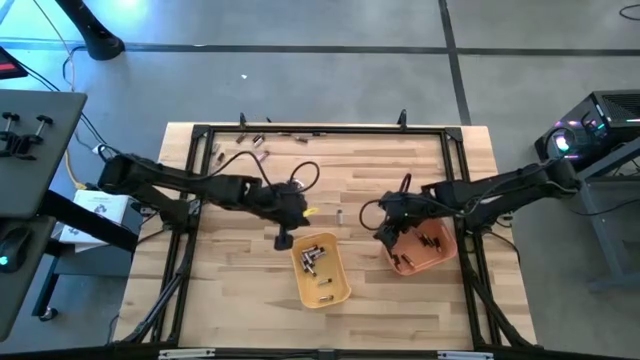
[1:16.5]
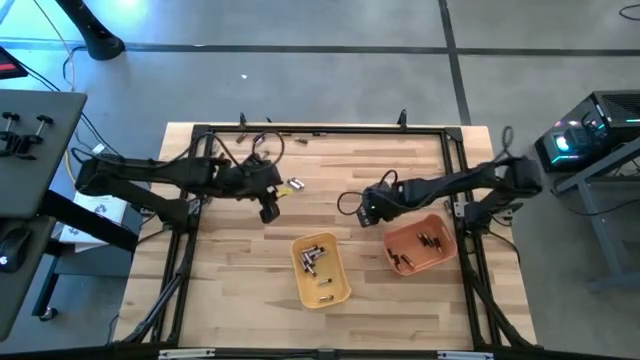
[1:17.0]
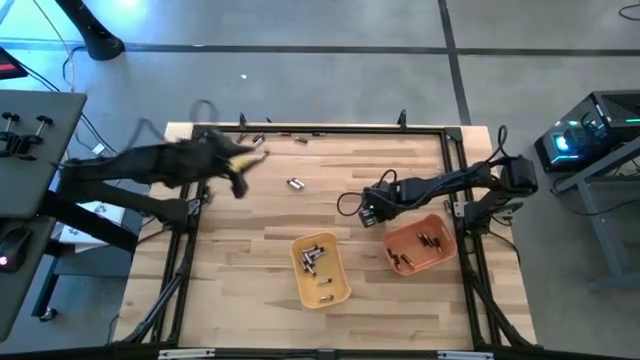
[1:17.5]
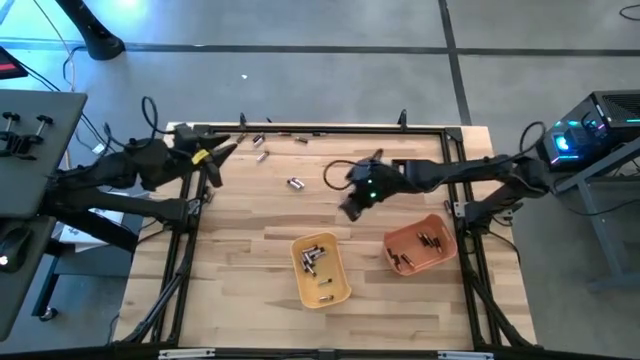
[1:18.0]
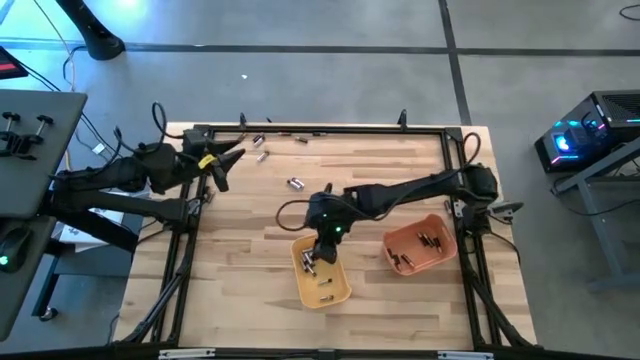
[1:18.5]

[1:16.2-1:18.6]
Task: Sort batteries
Put the silver battery into the yellow bin

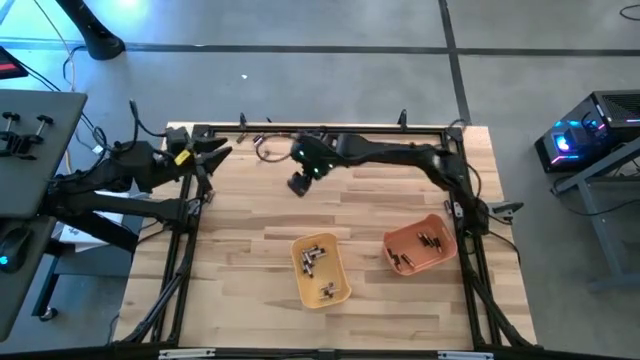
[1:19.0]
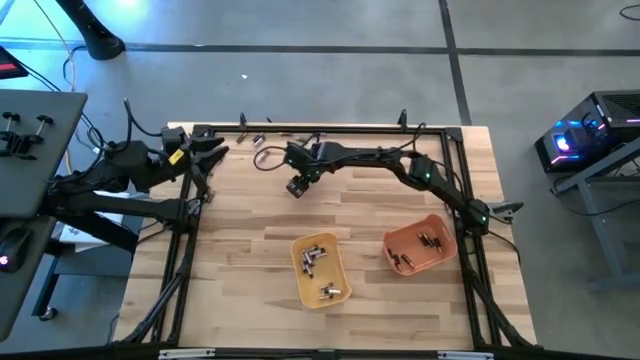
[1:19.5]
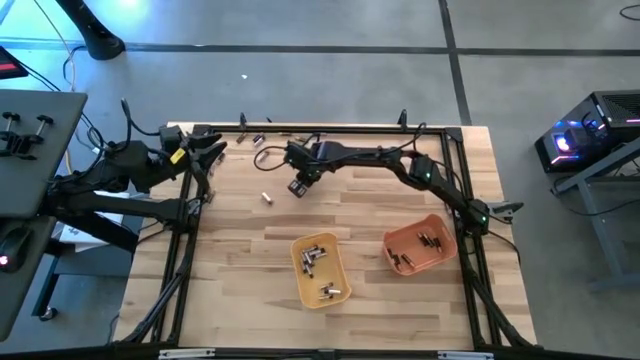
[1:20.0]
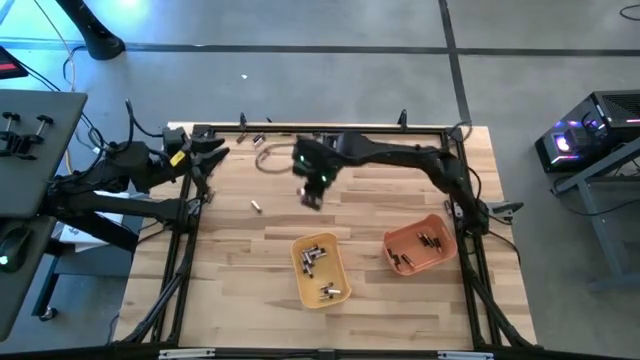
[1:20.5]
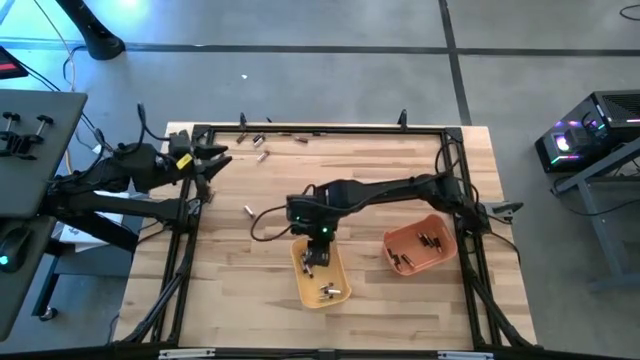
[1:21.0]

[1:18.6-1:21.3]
Put the silver battery into the yellow bin

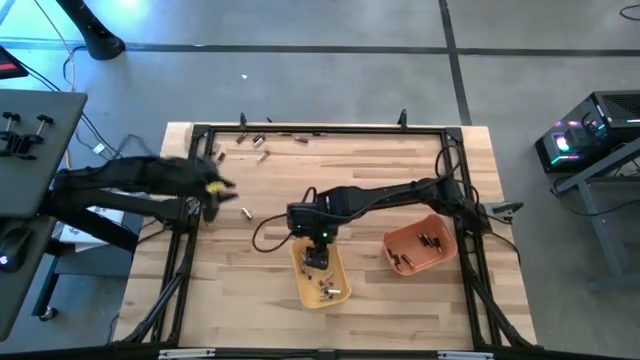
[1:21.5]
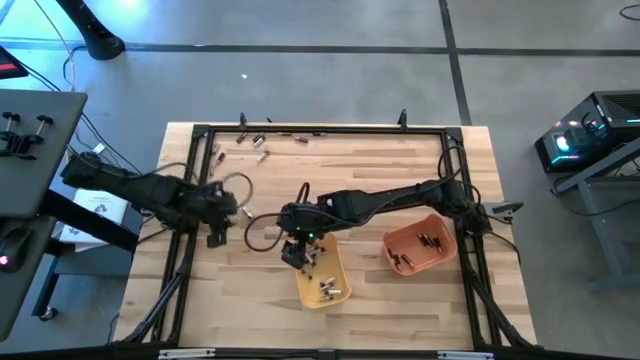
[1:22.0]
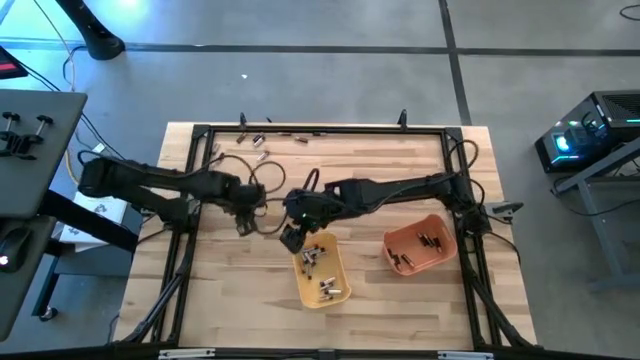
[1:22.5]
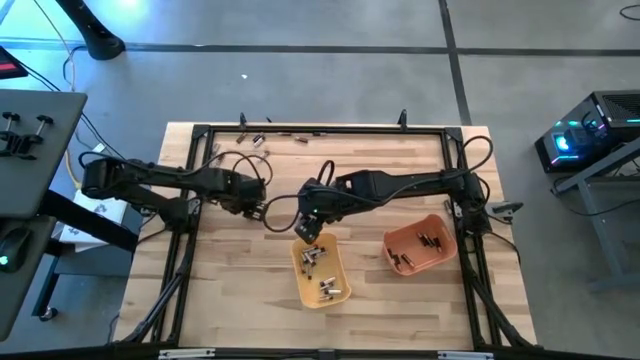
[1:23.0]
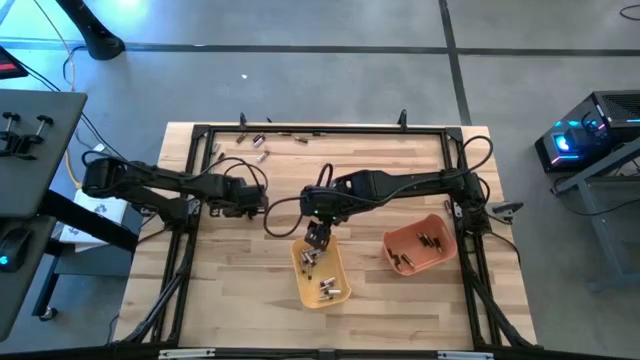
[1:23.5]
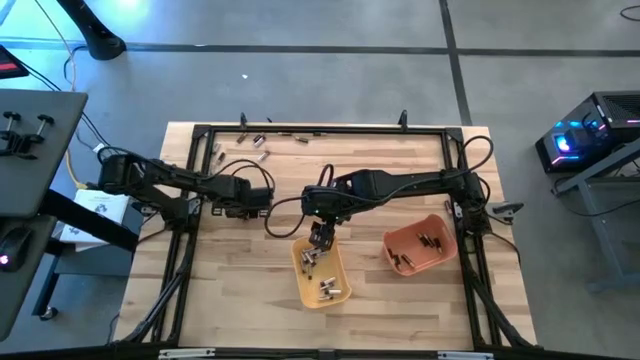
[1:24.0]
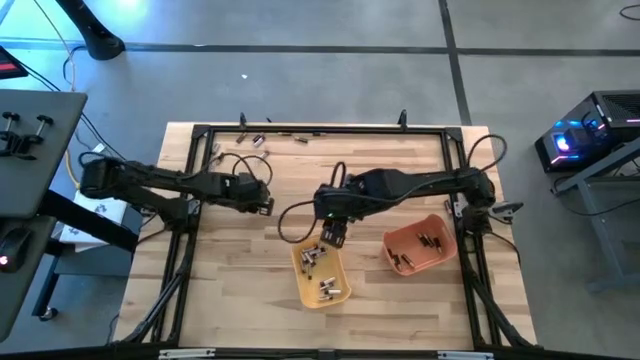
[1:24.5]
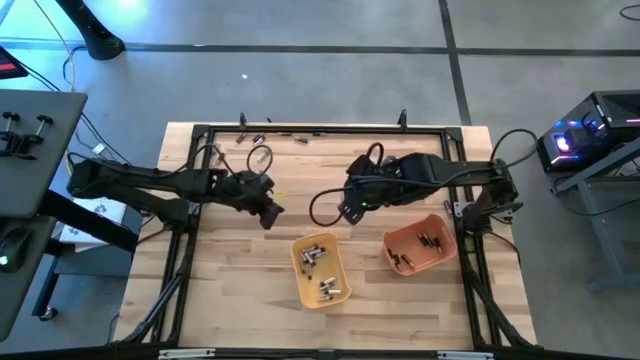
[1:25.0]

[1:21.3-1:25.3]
Put the silver battery into the yellow bin

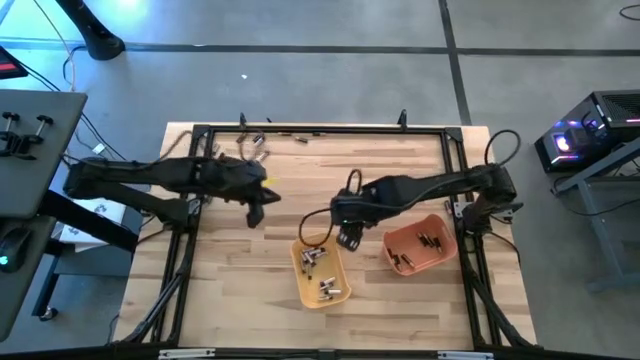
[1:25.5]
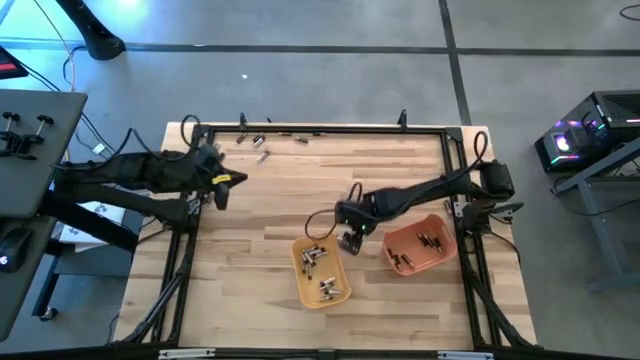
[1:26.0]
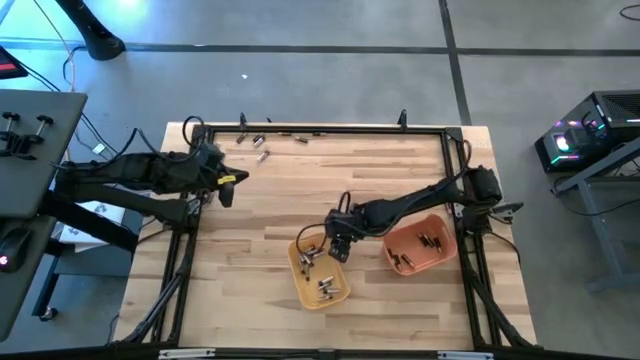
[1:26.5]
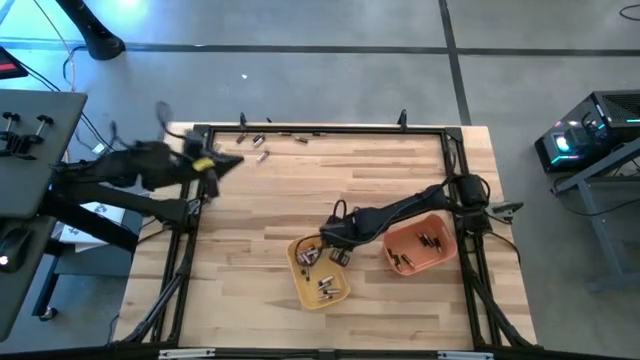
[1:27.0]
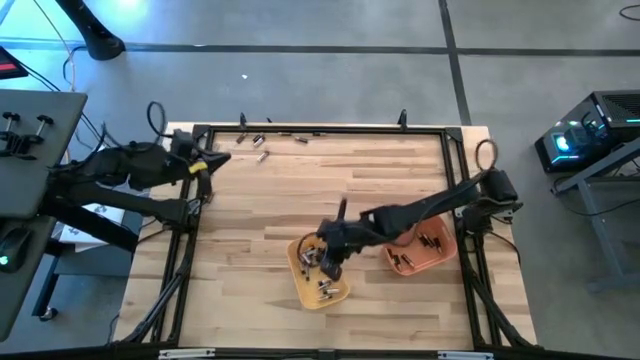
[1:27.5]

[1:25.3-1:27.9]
Put the silver battery into the yellow bin

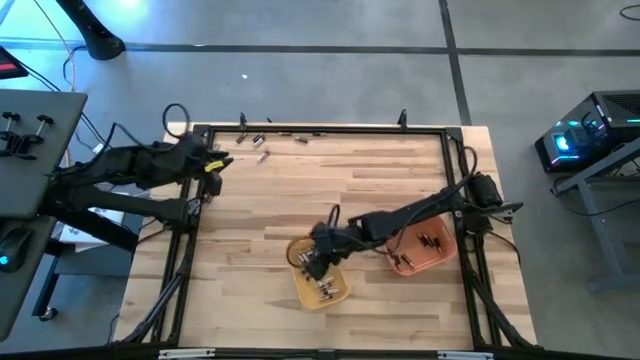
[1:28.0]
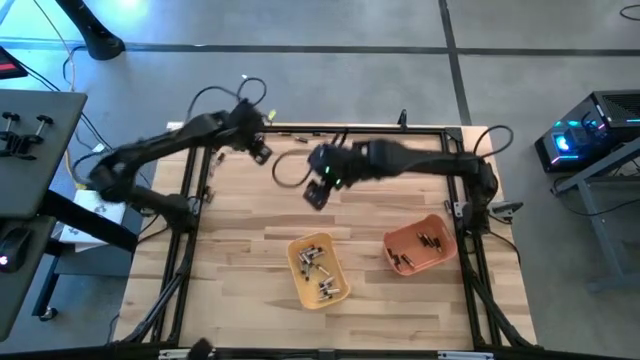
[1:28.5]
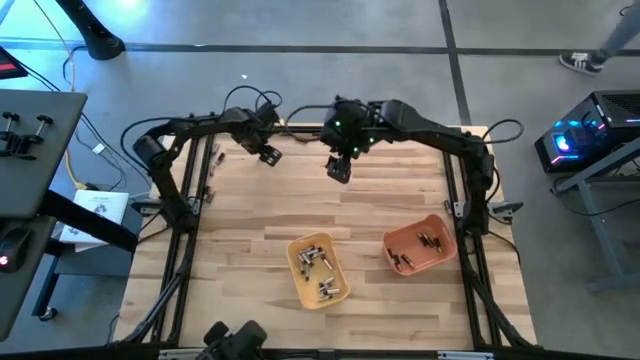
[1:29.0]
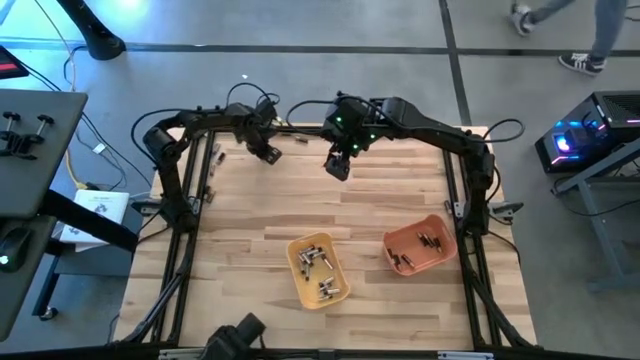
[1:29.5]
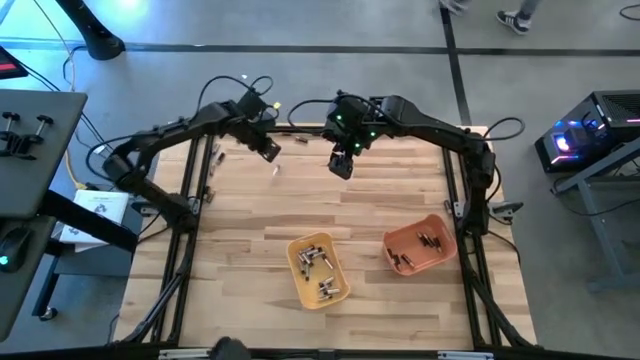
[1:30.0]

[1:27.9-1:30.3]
Put the silver battery into the yellow bin

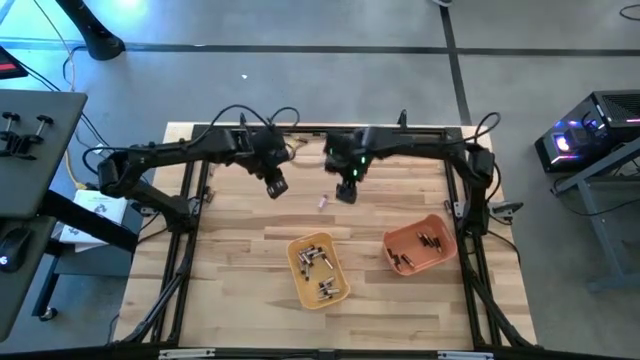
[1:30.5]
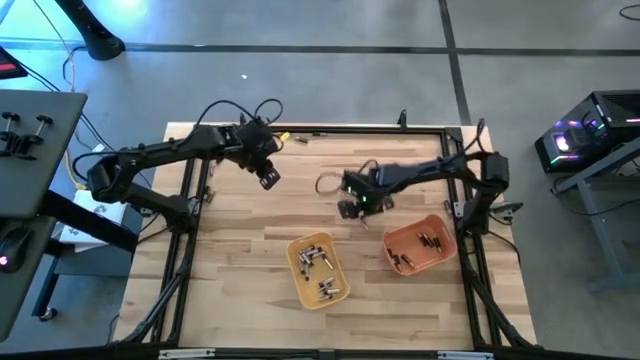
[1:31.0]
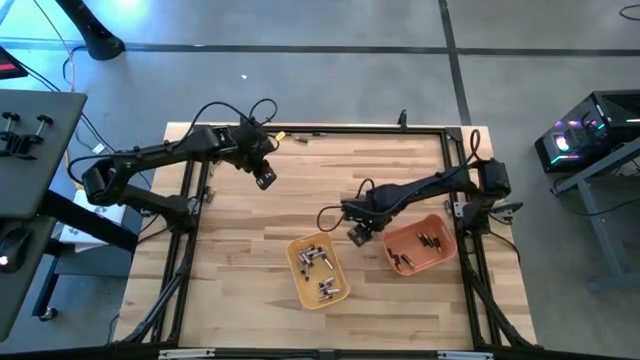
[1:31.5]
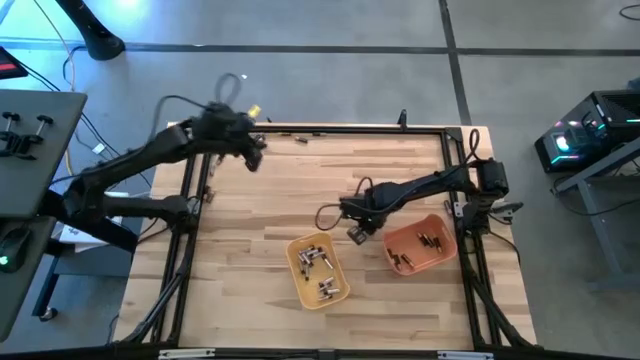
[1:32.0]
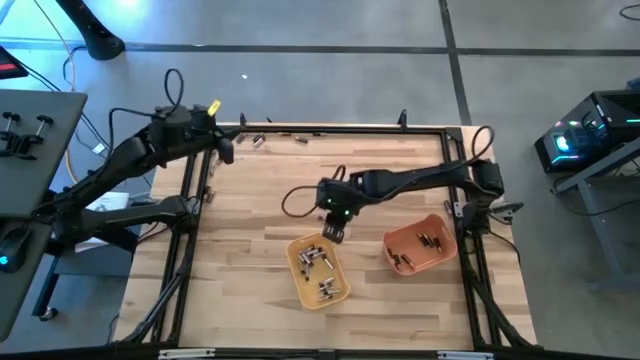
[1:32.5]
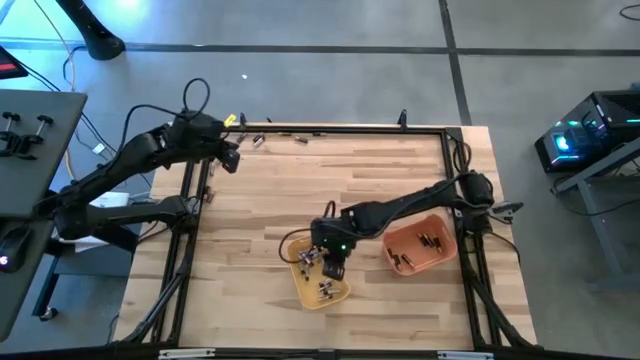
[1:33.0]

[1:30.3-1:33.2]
Put the silver battery into the yellow bin

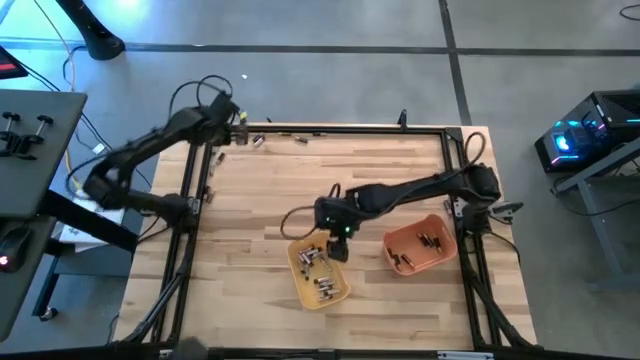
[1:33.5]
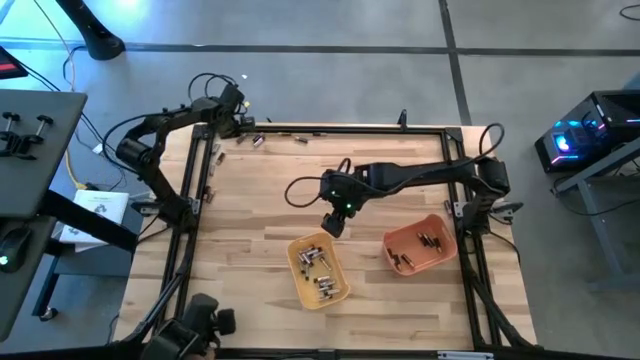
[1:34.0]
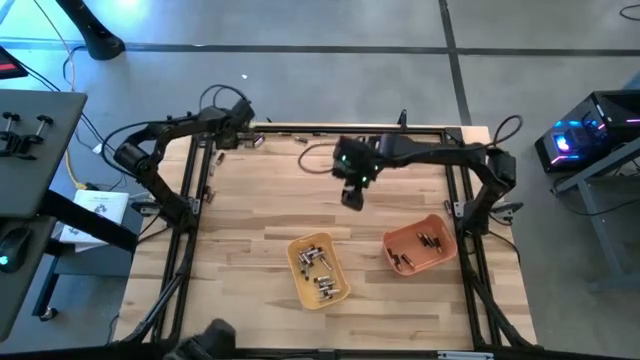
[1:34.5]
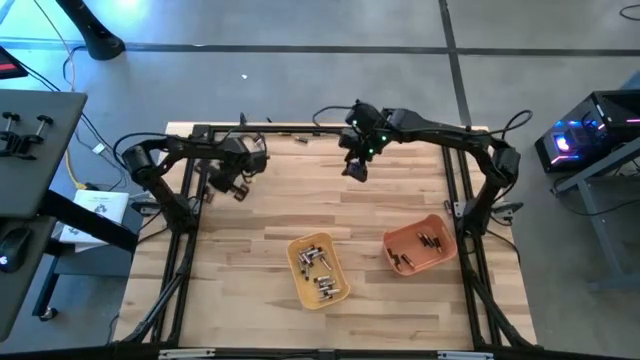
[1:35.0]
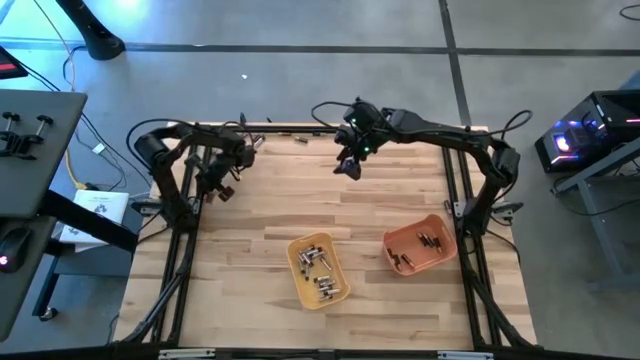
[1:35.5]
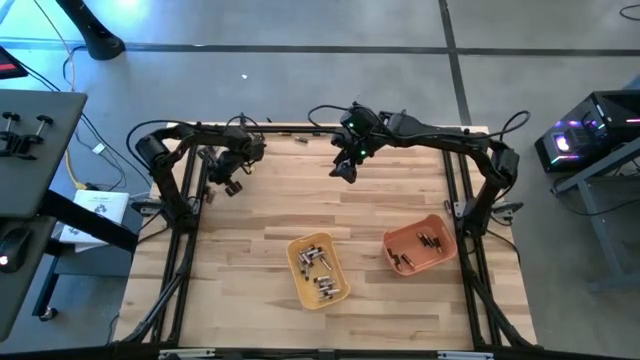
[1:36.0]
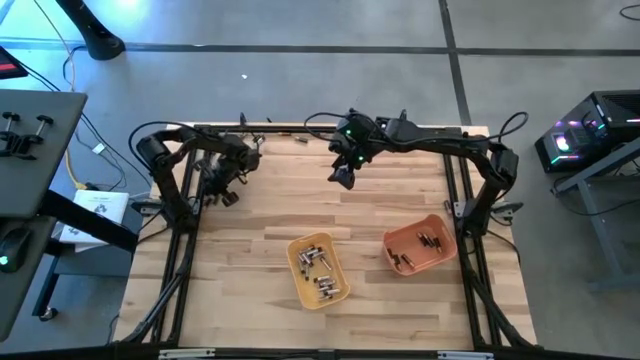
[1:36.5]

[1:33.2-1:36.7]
Adjust the black batteries
